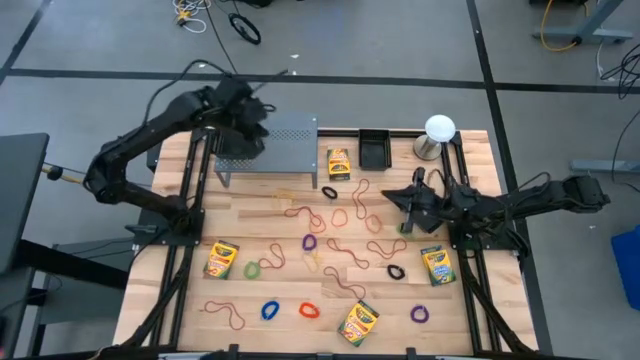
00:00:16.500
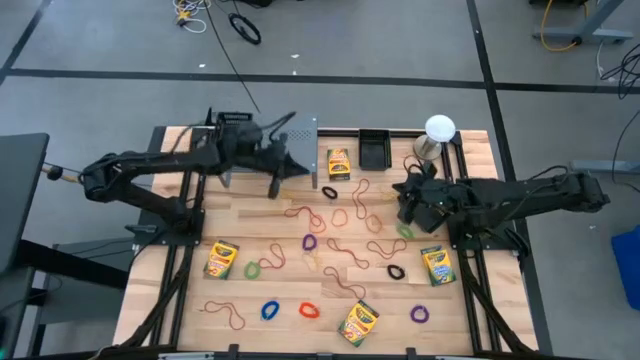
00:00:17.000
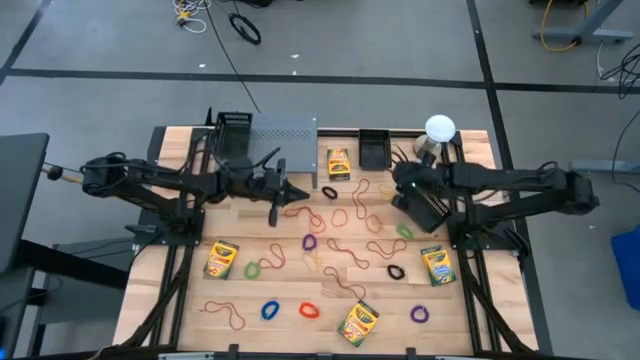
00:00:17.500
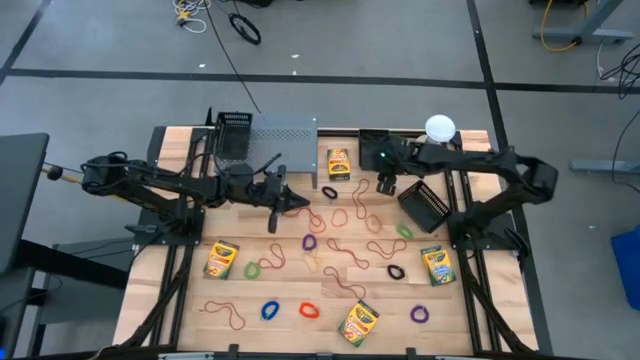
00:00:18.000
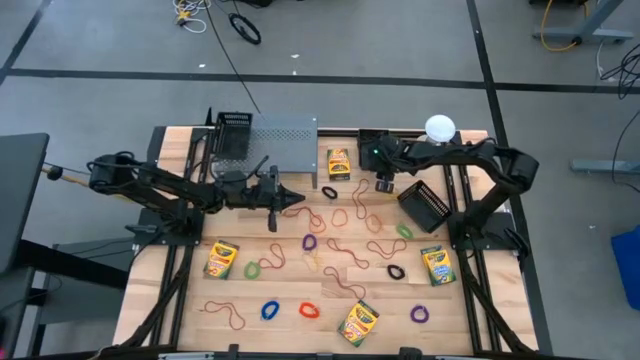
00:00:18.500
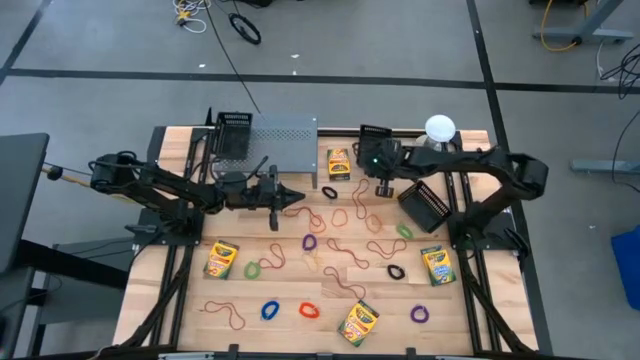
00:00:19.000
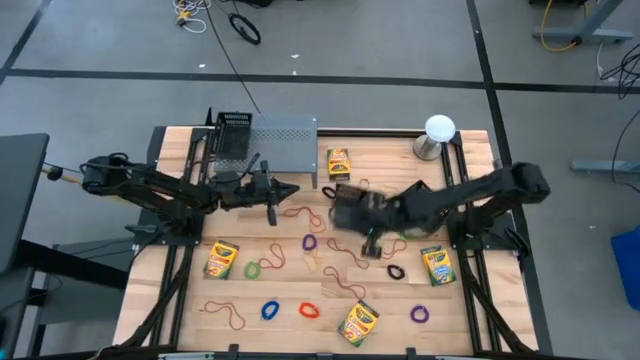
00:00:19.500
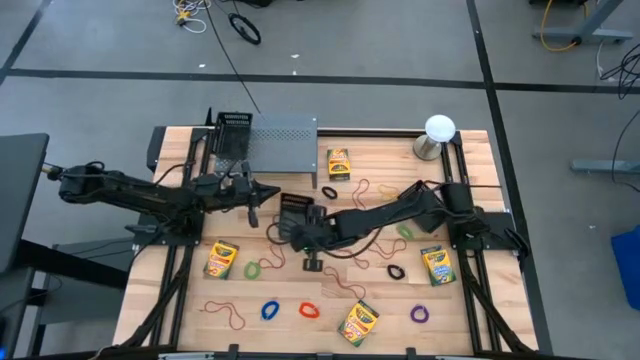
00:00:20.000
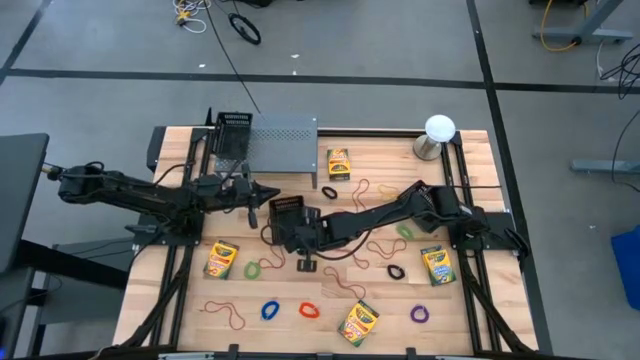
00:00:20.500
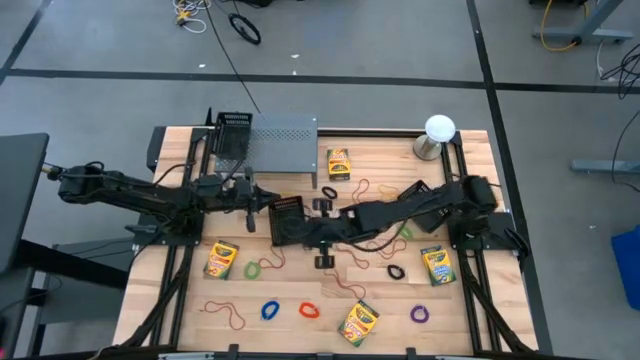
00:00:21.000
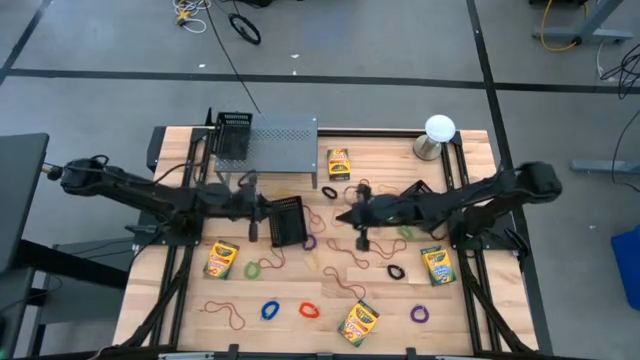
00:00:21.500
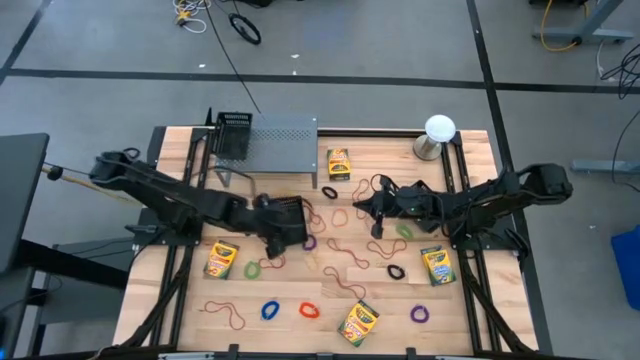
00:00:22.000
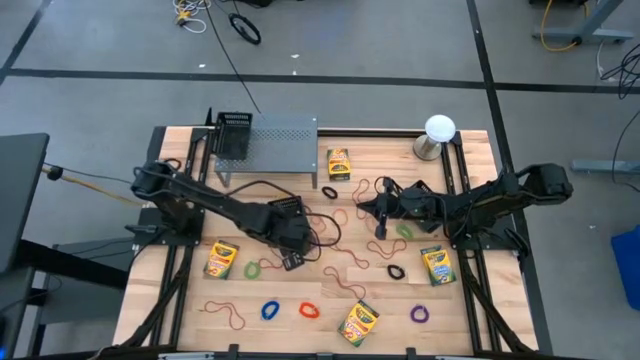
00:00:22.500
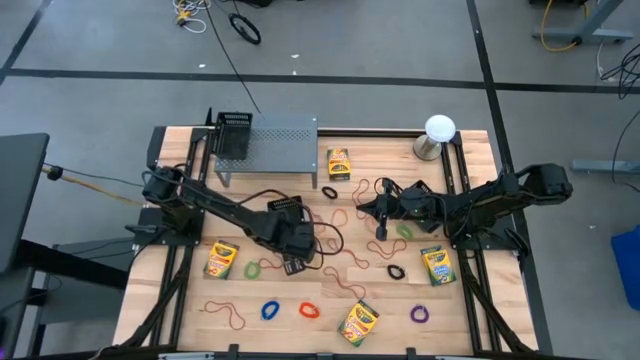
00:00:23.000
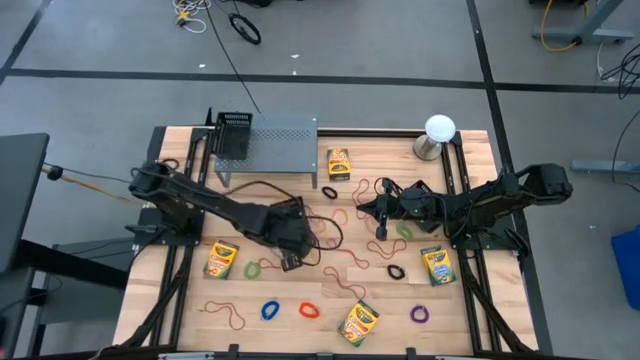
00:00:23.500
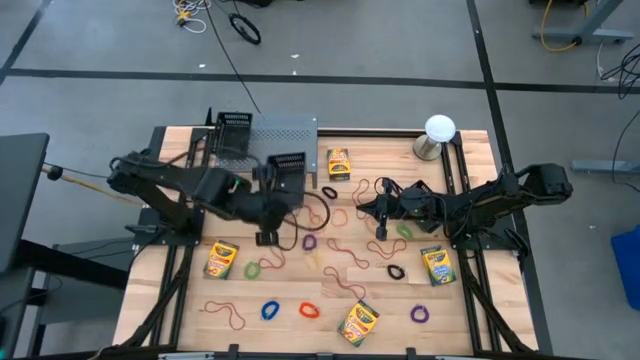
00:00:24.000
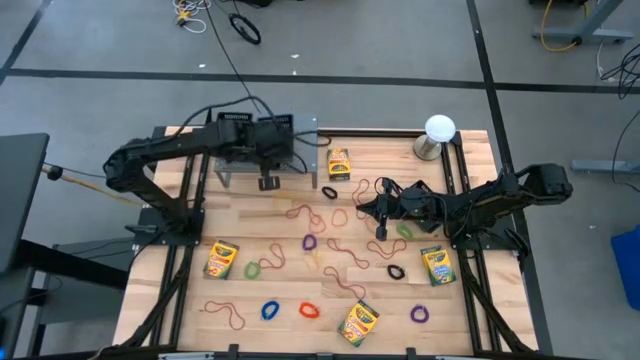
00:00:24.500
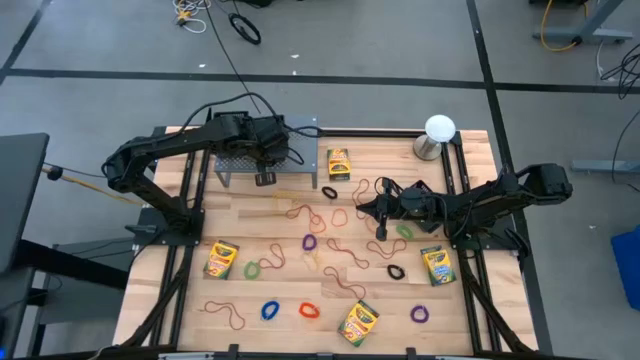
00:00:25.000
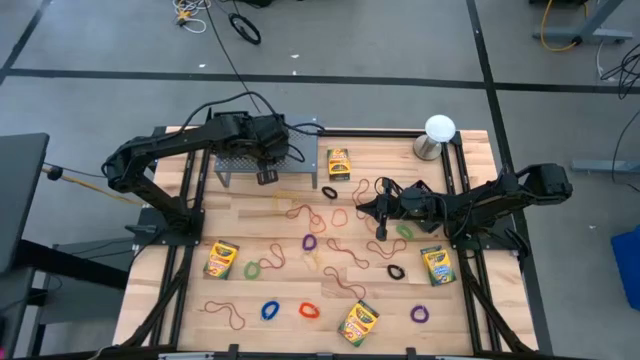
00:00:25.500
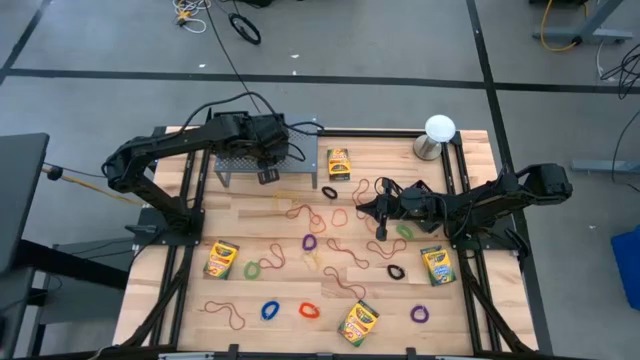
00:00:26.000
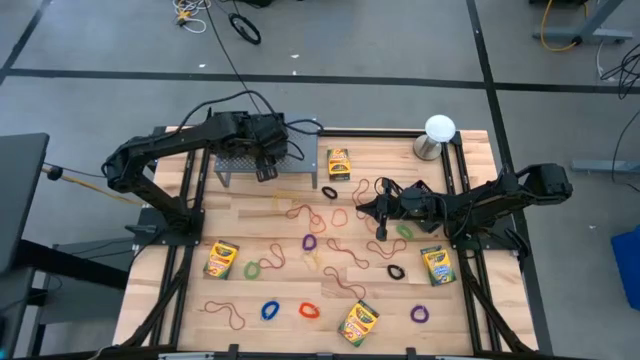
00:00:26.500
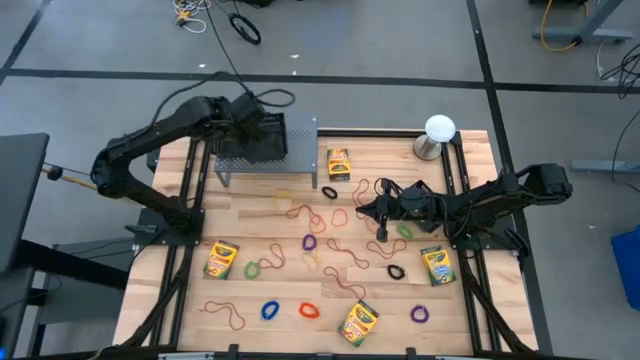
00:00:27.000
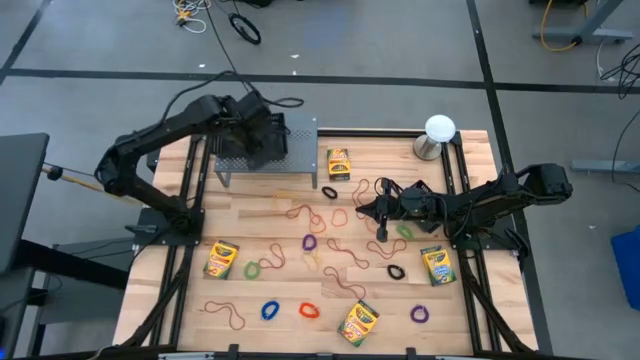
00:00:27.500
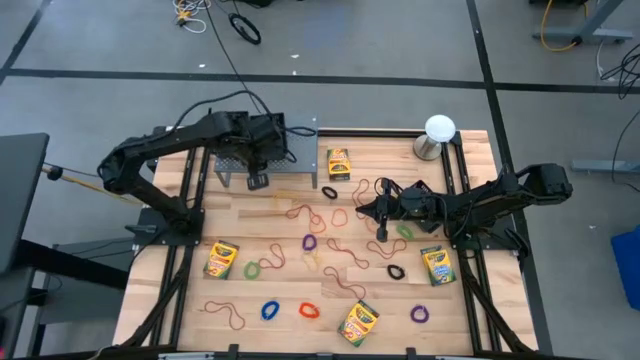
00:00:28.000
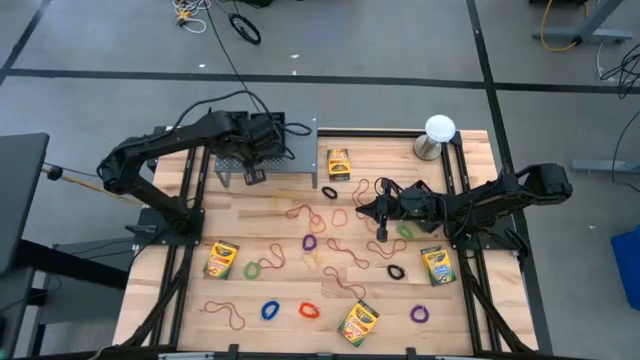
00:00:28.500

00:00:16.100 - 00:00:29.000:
Task: Pick & Place Office Desk Supplies
Put the top black bin on the shelf

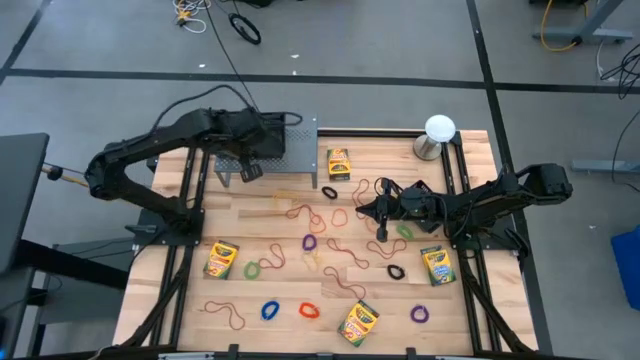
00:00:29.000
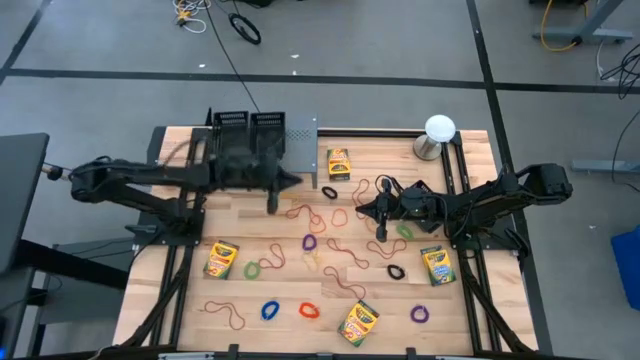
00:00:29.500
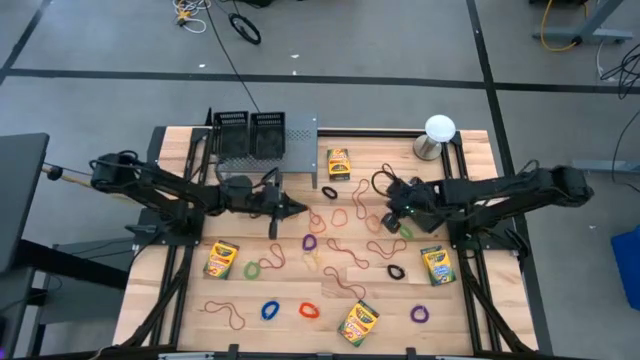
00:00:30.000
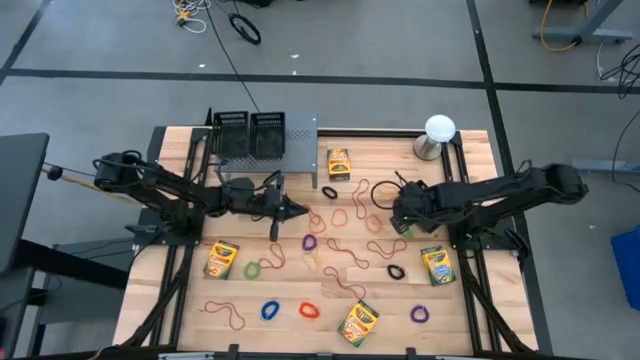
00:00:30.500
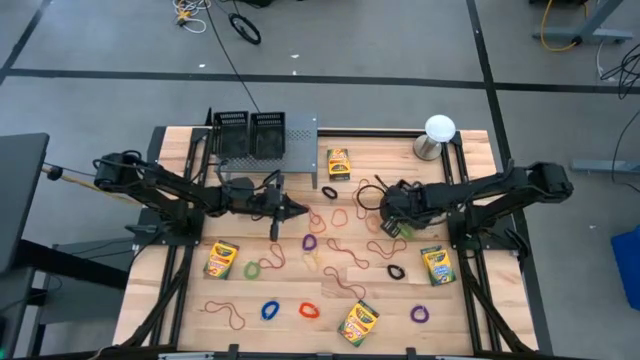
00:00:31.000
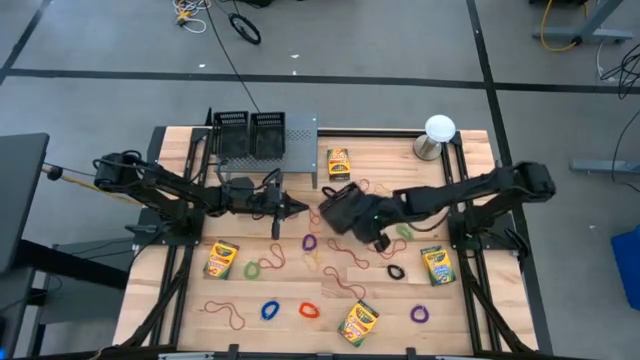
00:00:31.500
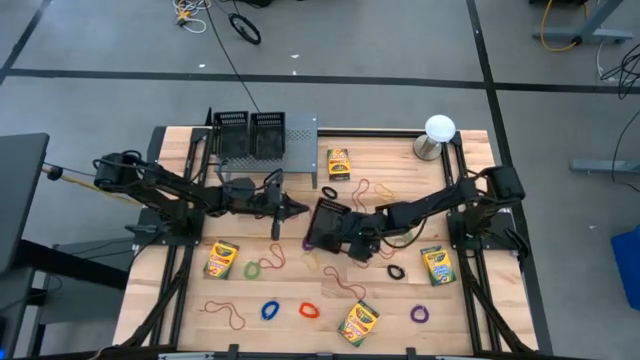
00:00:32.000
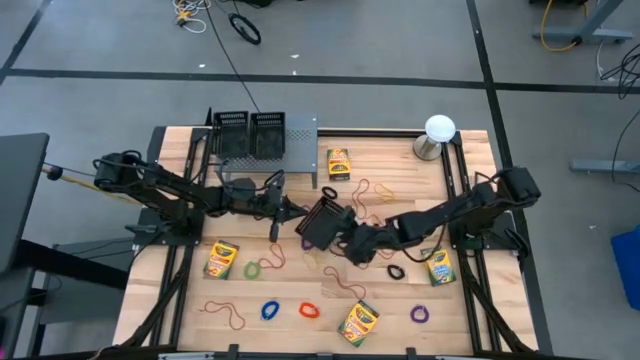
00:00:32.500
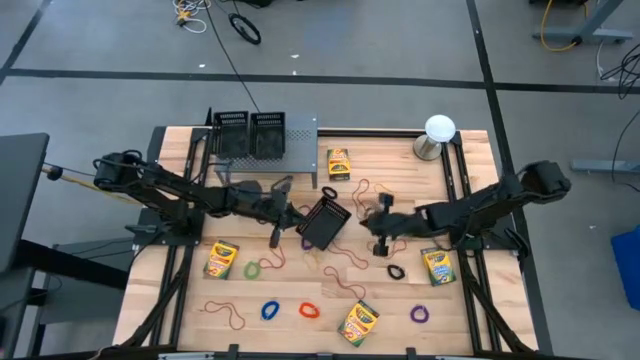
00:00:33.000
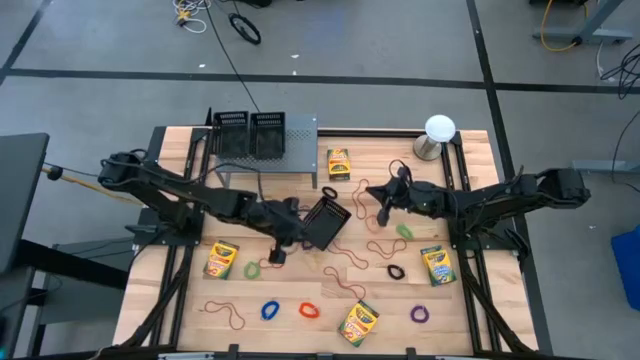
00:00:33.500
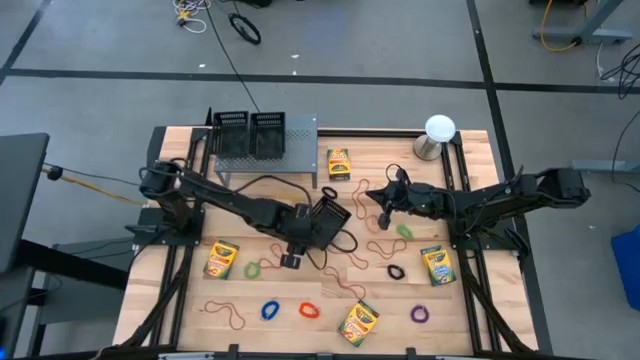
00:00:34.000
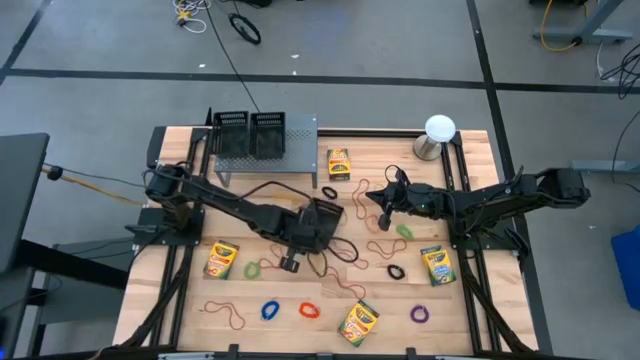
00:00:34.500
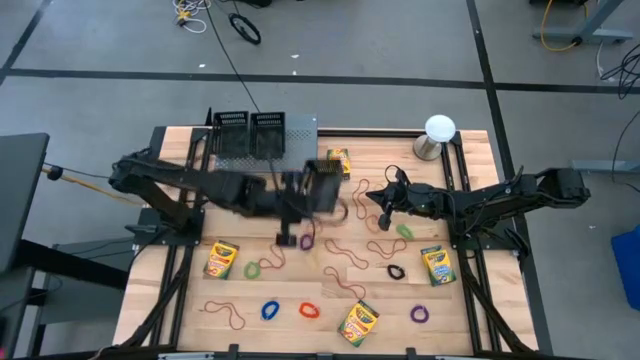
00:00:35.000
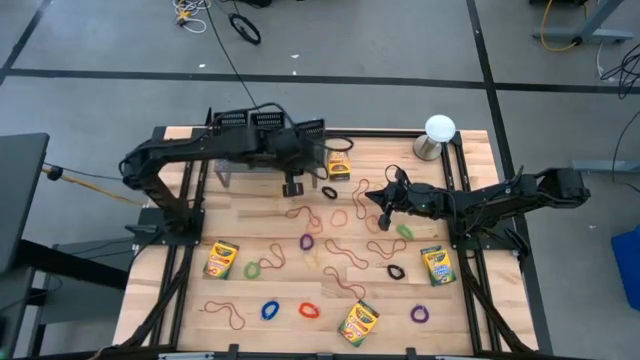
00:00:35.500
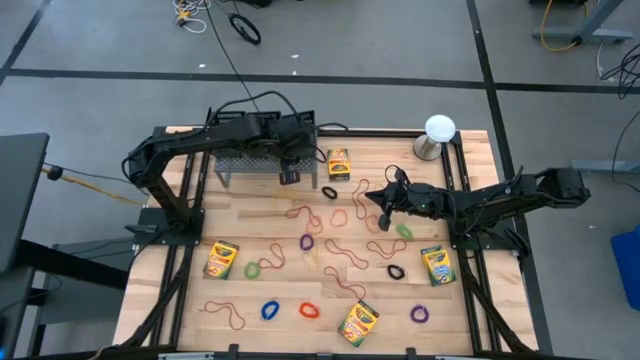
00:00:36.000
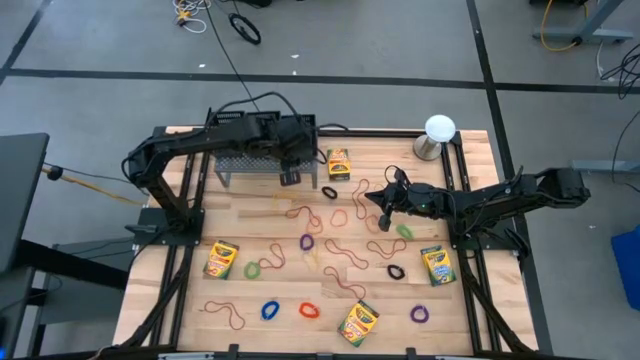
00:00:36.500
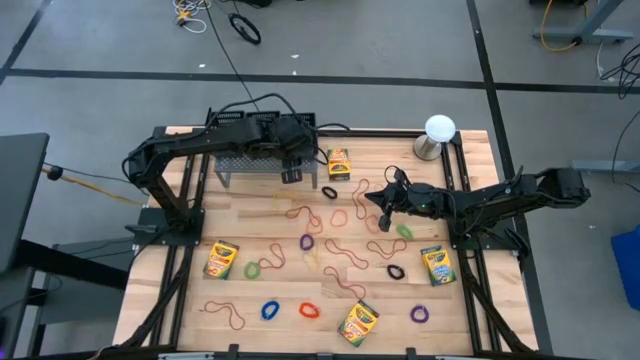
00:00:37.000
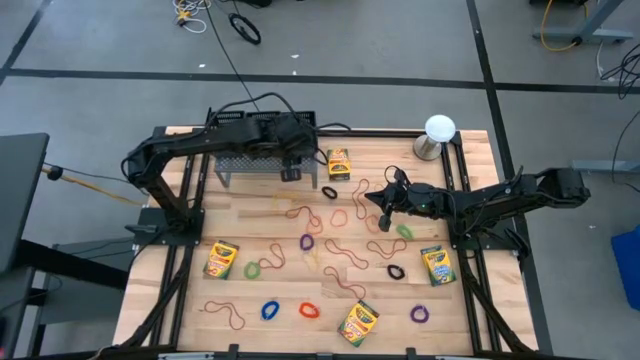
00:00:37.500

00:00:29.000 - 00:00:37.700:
Put the black bin on the shelf
